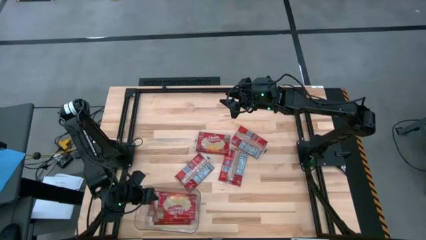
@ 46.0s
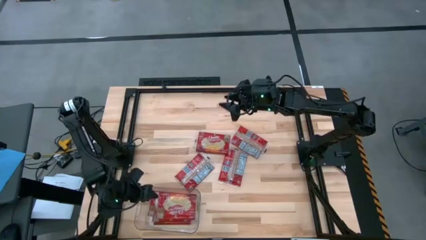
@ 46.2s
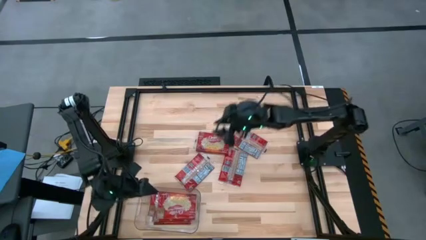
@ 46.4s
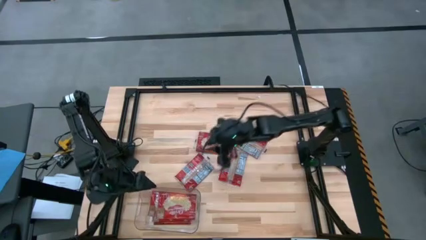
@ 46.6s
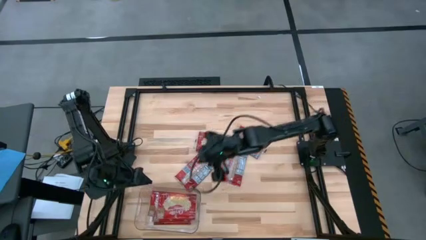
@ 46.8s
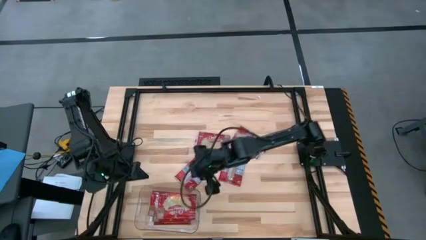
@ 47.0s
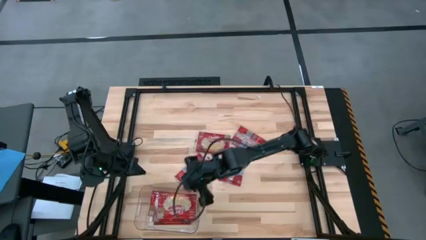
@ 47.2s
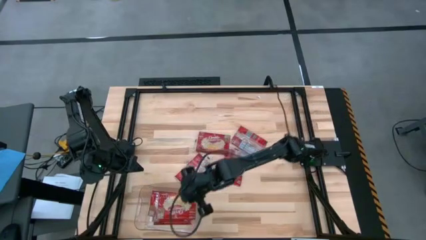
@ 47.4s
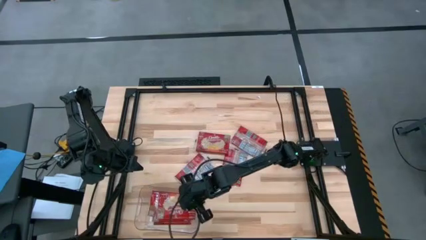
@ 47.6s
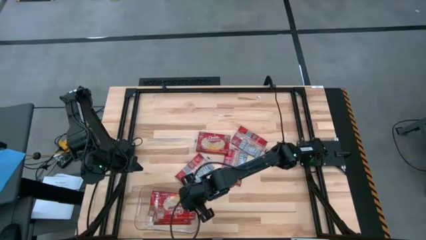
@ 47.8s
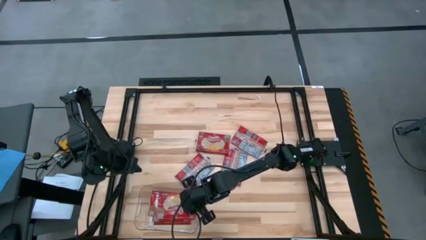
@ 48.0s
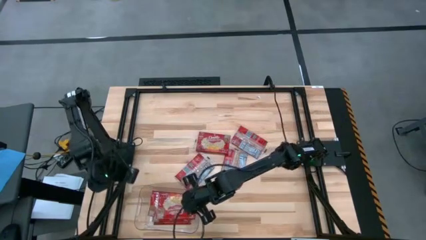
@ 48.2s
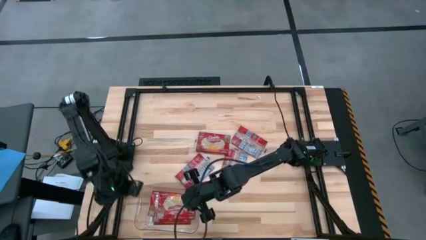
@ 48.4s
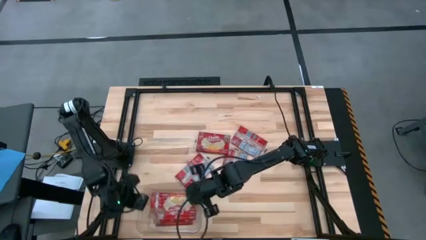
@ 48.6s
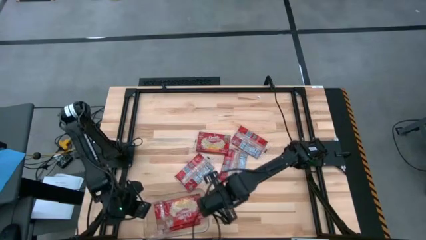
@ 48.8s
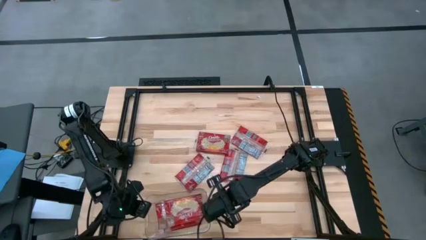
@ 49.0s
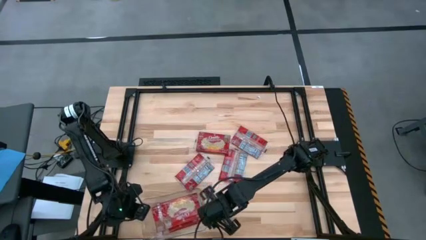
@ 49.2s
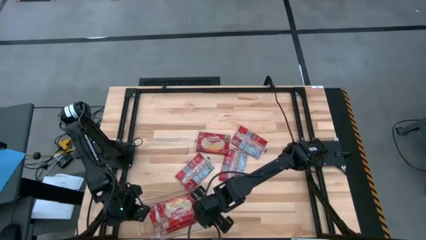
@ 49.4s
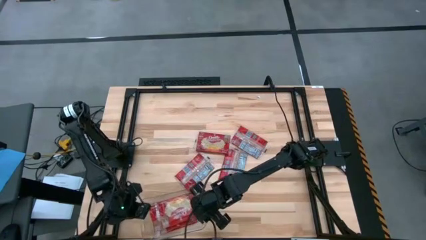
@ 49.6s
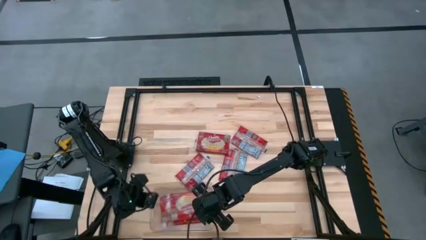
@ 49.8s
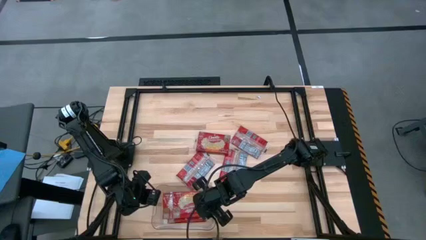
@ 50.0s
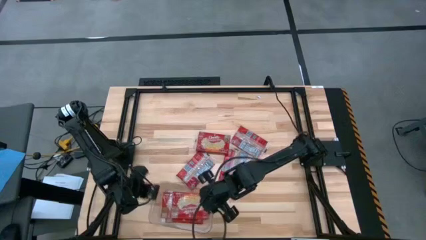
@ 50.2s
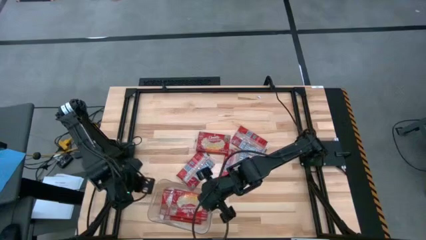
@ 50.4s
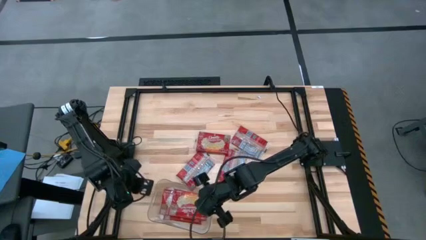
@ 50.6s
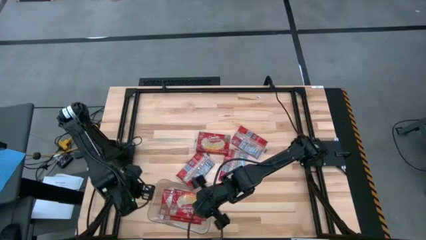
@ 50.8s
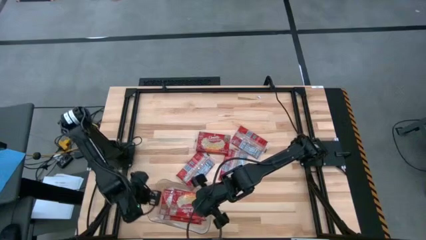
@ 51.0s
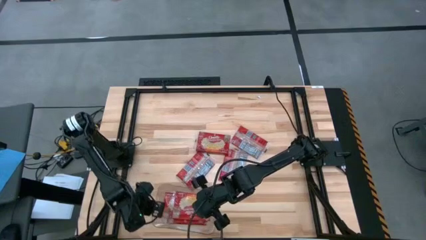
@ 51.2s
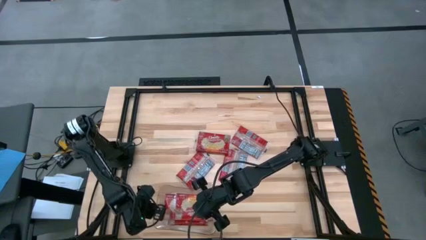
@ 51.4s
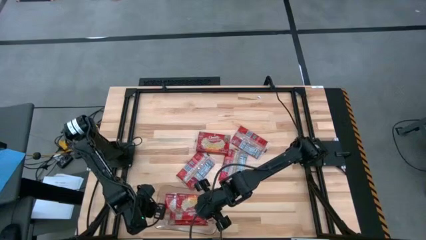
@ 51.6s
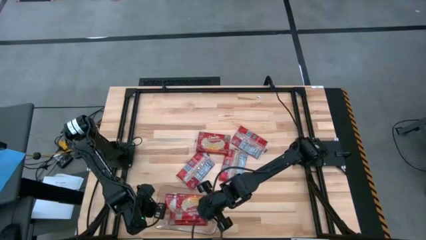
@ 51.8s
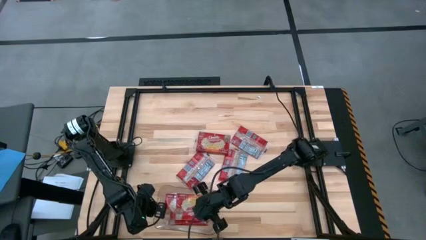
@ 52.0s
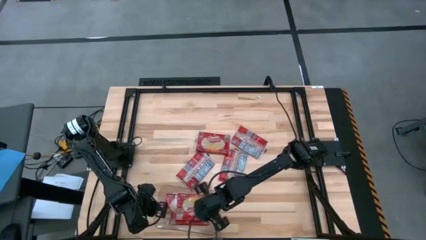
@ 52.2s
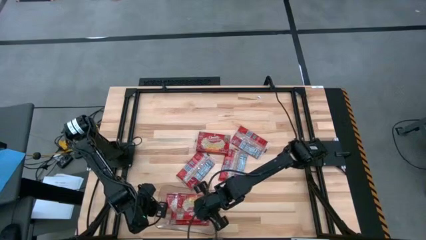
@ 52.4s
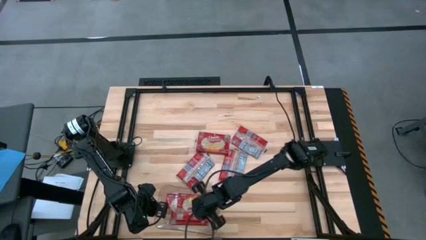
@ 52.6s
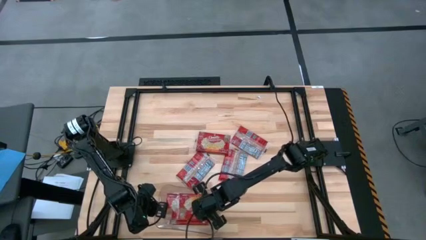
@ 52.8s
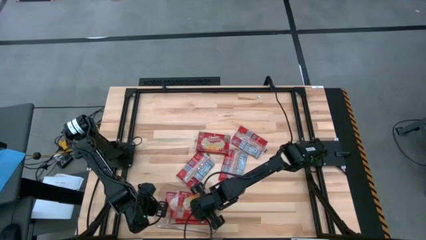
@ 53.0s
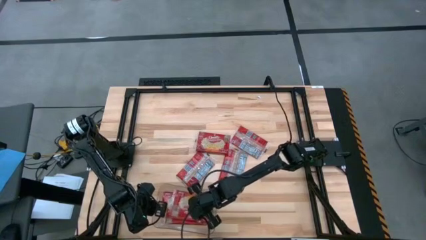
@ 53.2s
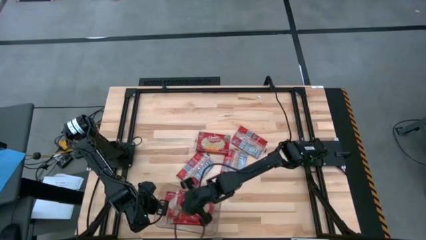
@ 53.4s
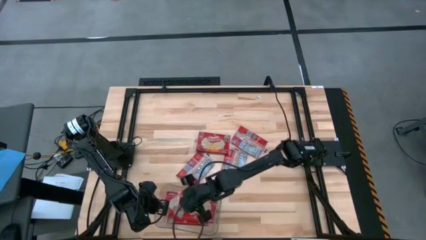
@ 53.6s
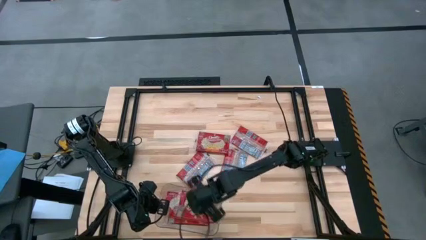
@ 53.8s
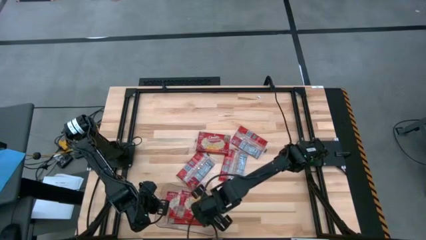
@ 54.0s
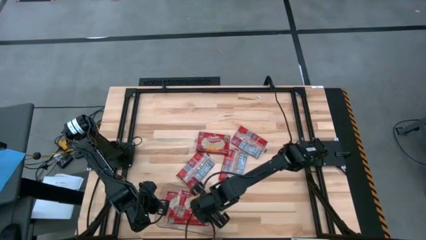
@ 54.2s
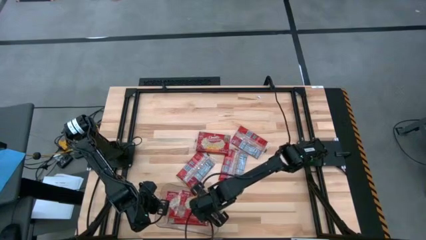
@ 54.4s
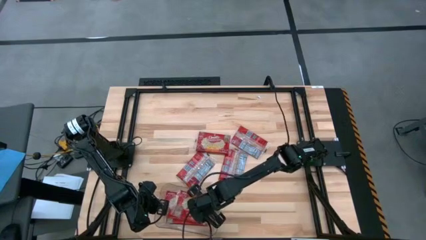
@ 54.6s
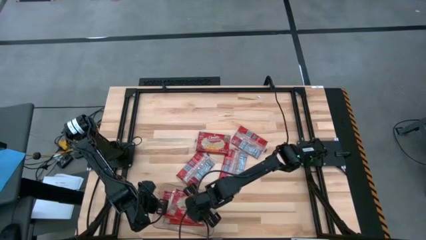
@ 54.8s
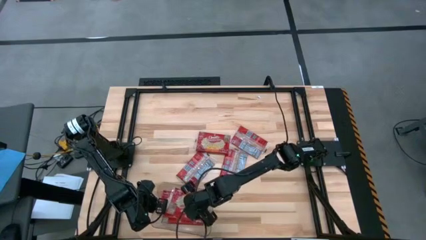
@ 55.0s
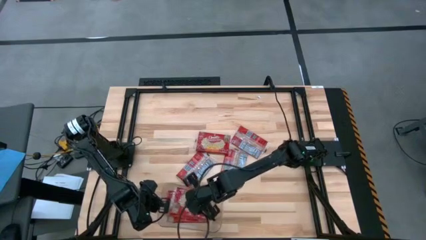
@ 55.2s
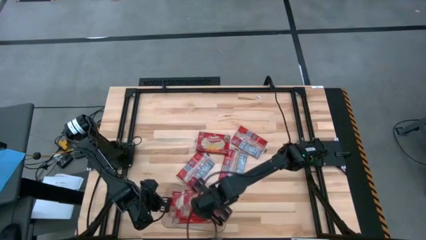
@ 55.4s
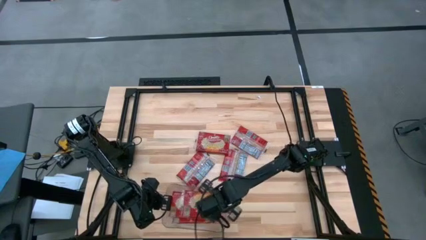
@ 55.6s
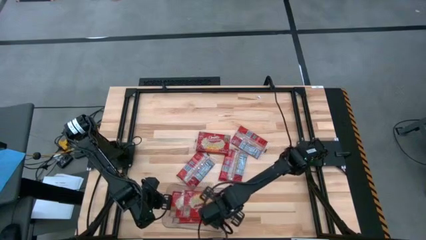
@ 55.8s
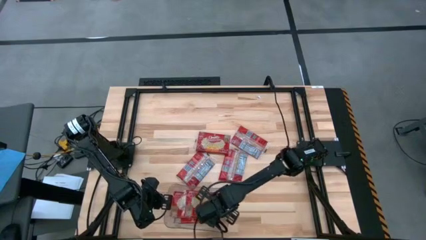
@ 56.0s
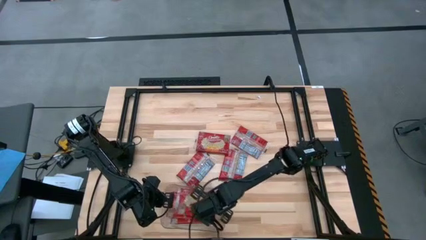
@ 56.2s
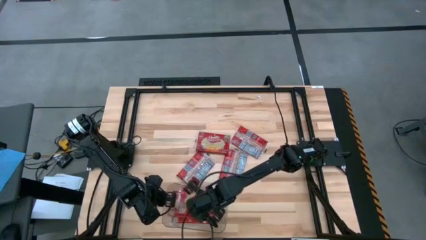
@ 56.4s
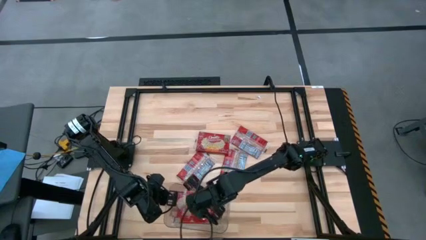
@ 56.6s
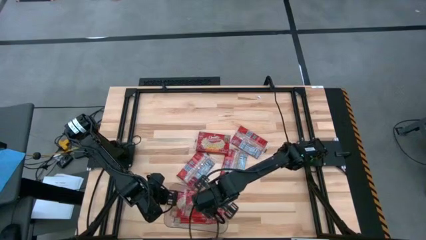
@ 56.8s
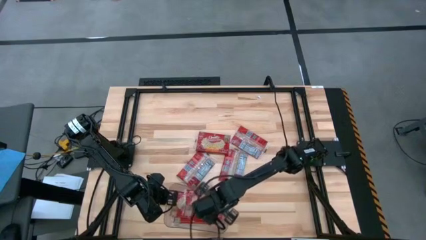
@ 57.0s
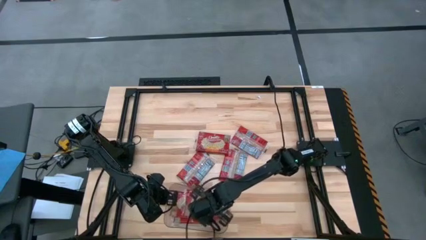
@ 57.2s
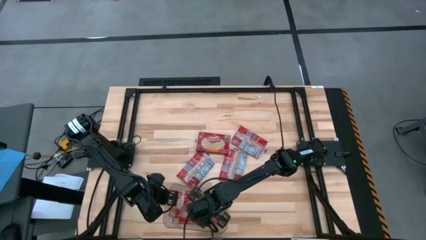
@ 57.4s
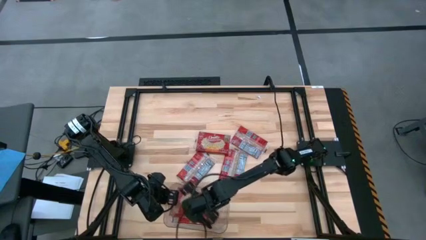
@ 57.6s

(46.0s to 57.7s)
Task: Sort popcorn bags into baskets
Adjust the red popcorn bags in the transparent bin
